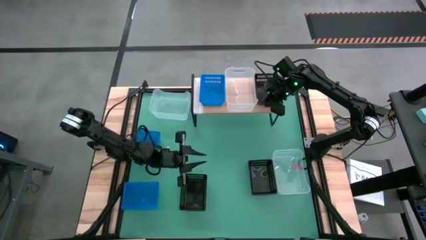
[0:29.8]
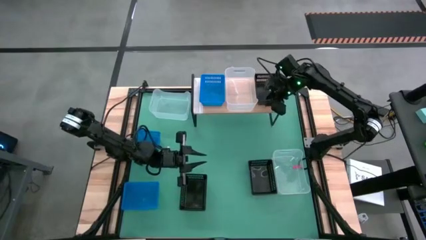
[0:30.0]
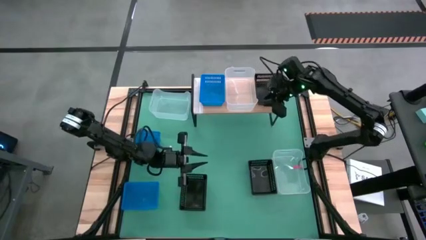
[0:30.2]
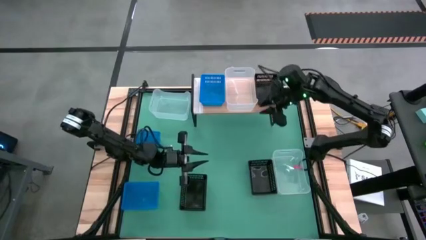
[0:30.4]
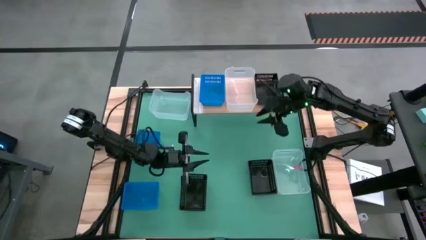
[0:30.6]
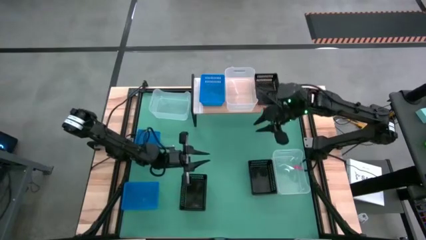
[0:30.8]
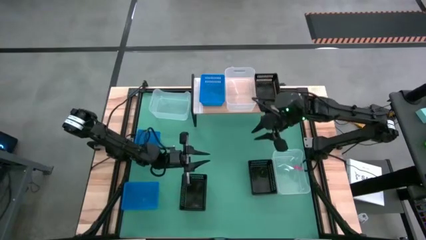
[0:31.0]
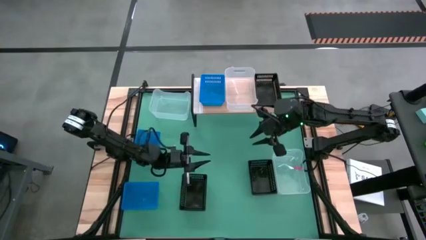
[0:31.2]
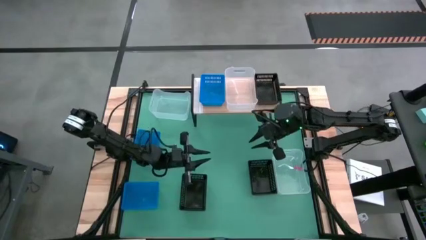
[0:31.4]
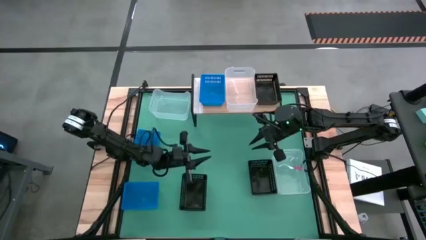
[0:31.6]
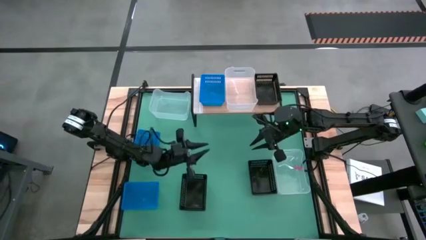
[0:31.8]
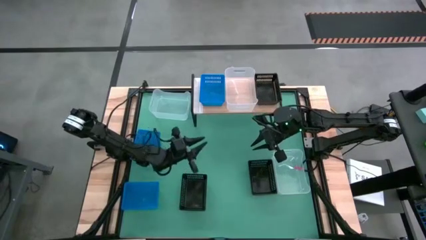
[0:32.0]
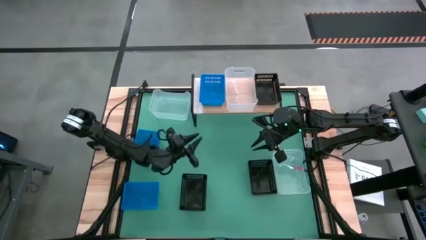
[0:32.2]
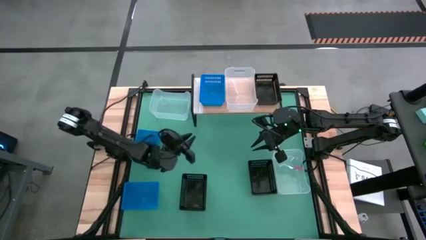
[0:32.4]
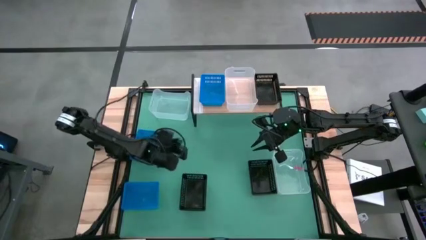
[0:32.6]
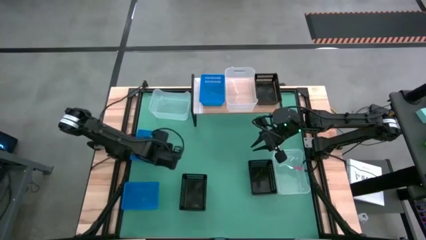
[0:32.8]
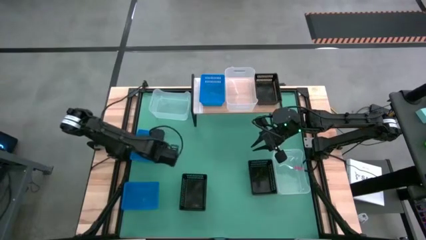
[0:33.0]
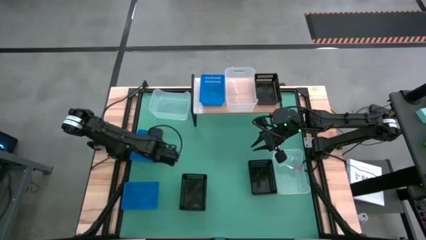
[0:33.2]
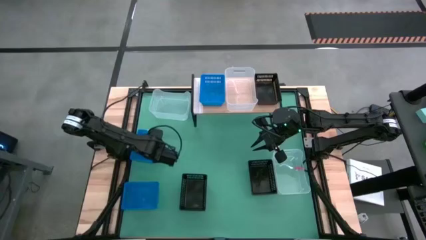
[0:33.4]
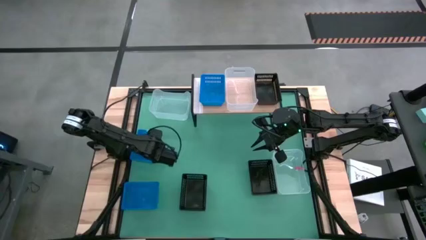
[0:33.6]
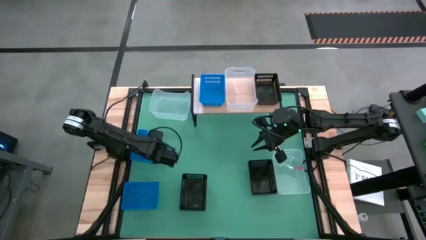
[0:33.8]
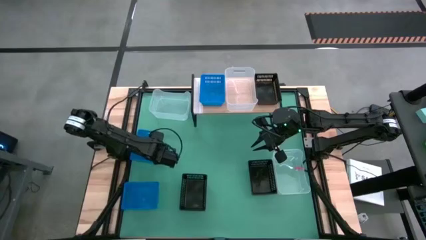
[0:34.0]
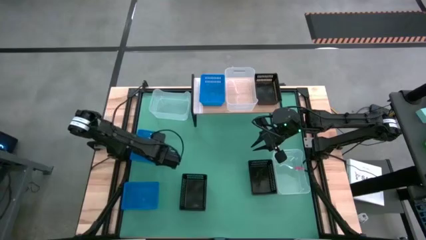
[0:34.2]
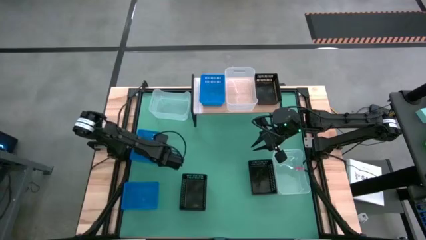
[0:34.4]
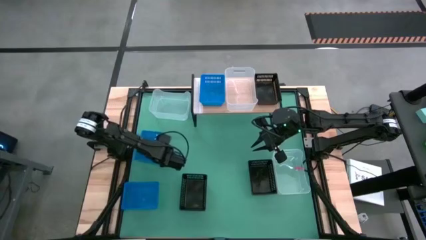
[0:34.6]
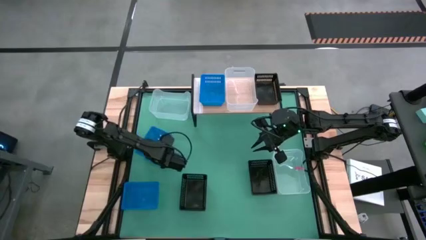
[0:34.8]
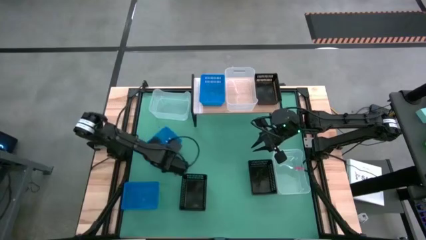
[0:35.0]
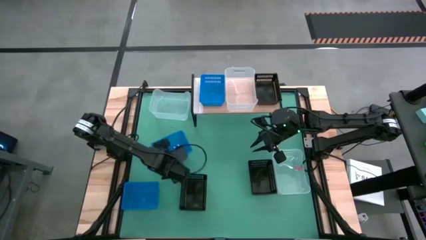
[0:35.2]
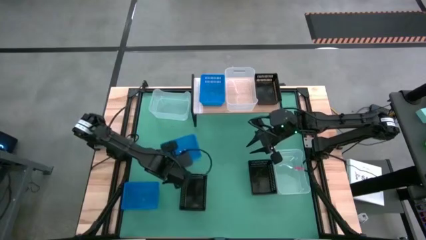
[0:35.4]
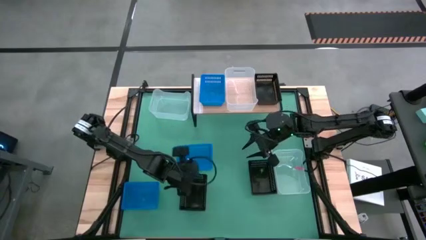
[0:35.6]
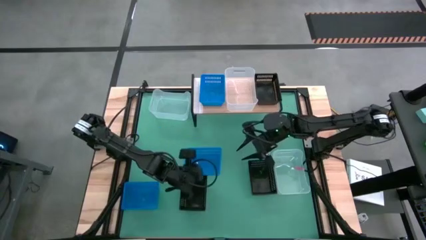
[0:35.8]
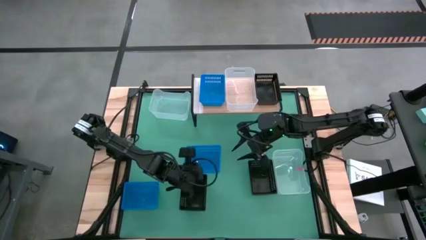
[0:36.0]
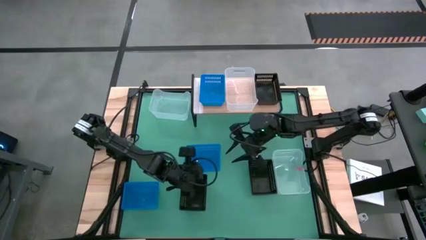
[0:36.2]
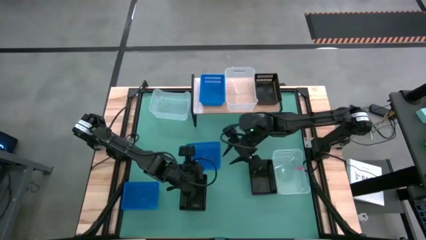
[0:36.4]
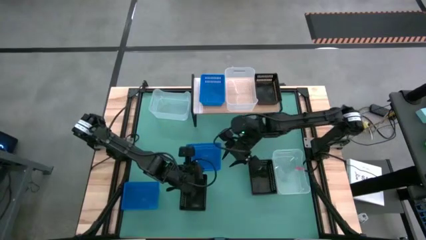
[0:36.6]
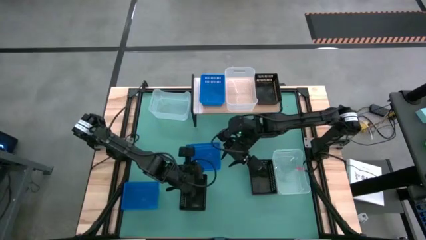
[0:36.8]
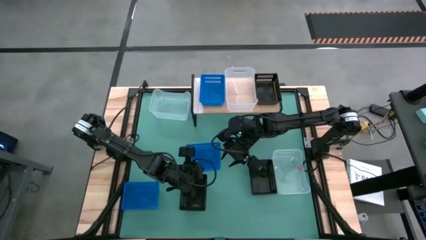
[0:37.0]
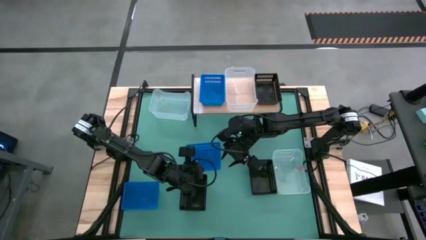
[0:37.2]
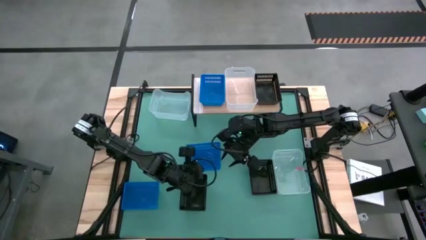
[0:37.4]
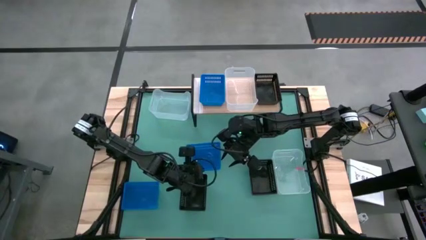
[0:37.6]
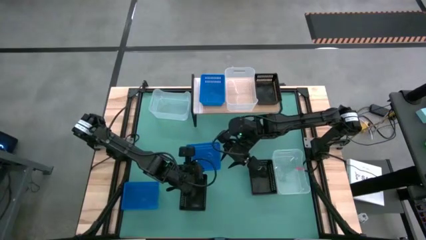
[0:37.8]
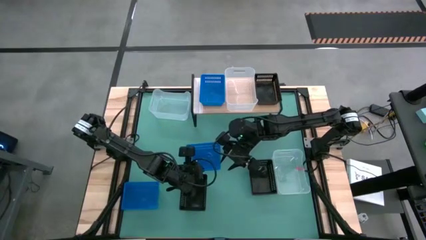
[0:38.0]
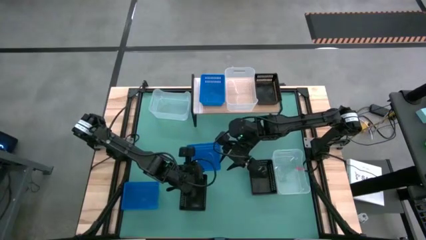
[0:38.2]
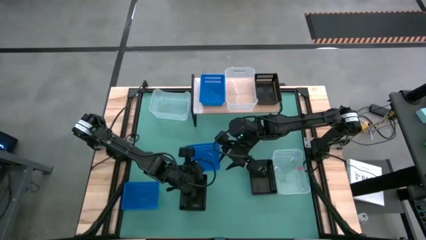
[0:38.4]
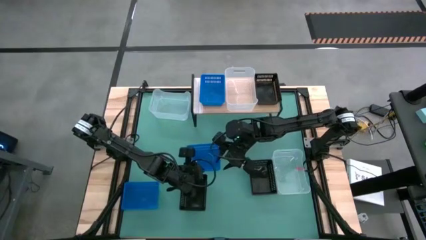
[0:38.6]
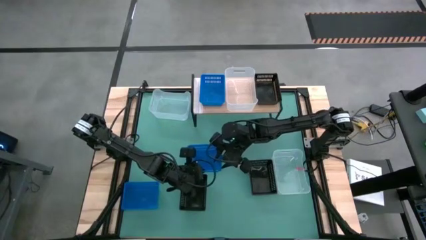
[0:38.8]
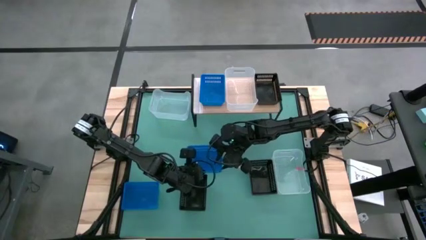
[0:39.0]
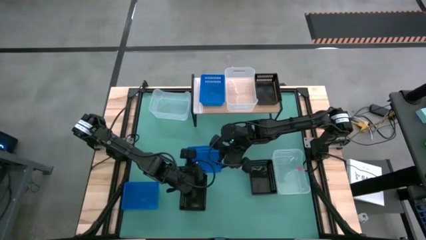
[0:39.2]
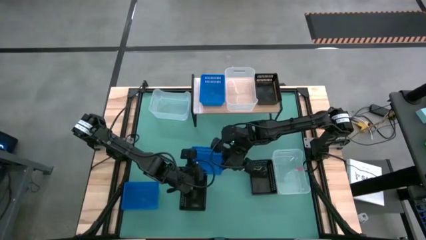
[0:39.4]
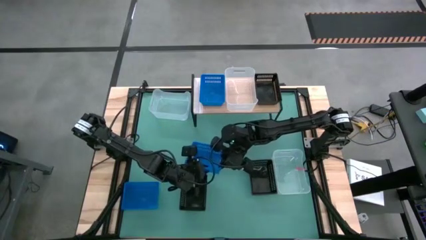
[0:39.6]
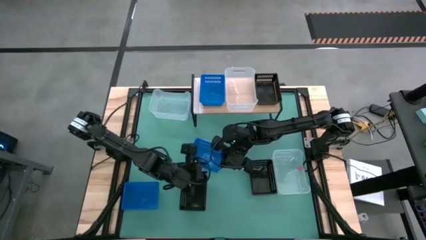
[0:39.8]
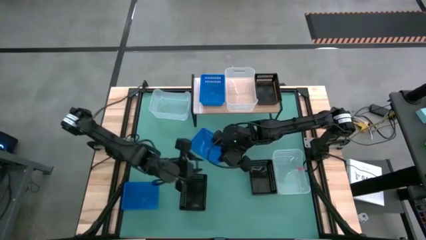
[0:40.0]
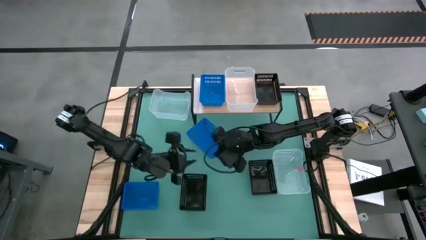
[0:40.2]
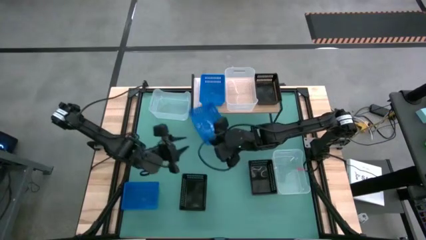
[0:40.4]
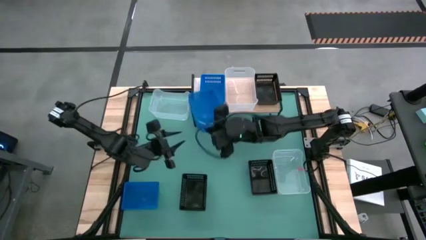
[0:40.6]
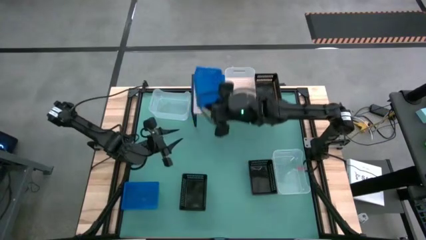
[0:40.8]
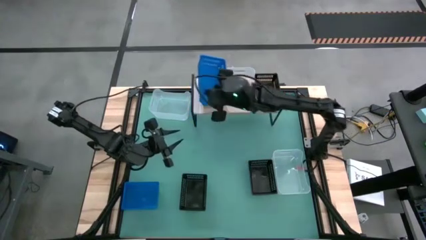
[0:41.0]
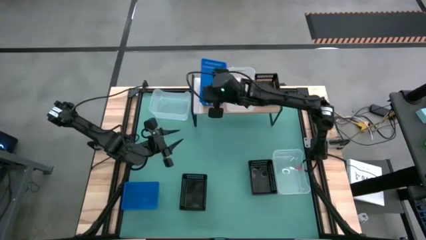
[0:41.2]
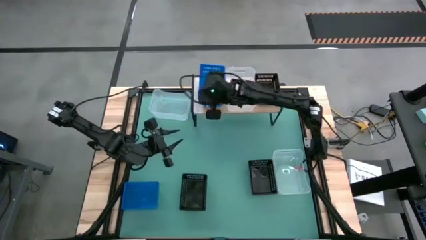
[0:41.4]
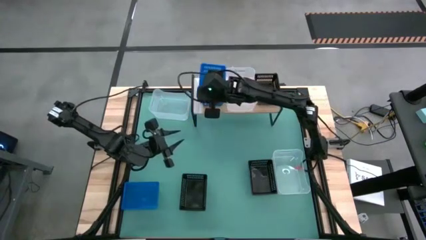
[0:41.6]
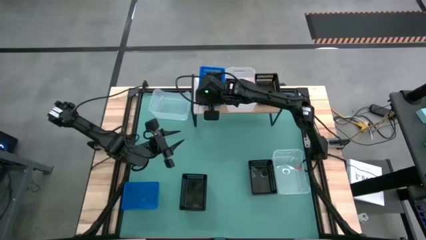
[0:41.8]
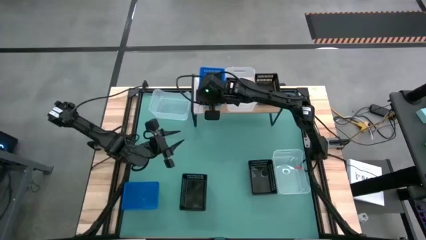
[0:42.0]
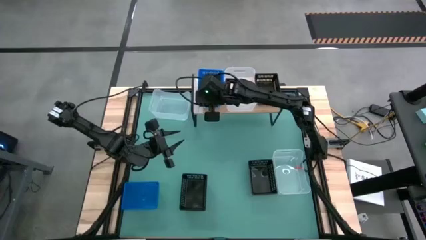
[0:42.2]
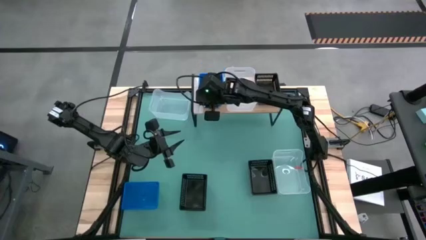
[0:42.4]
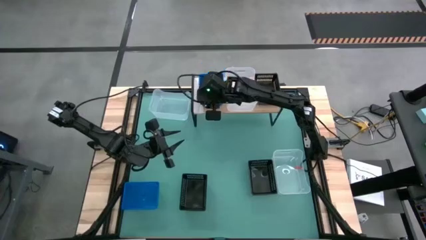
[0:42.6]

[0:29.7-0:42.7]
Task: Stack baskets on shelf by color
Stack the top blue bin on the blue bin on the shelf
